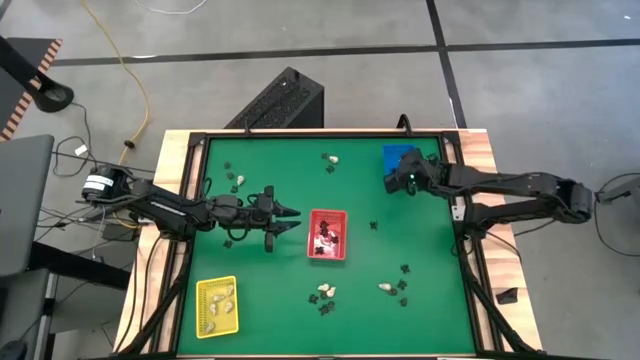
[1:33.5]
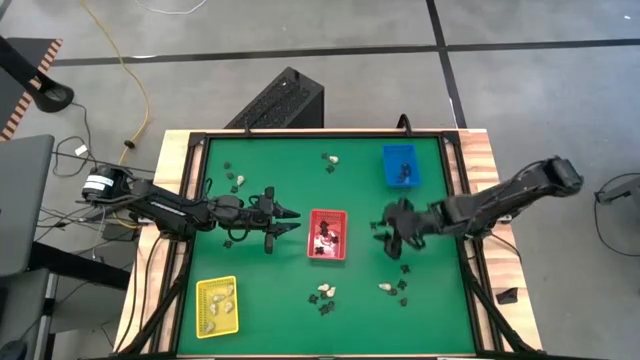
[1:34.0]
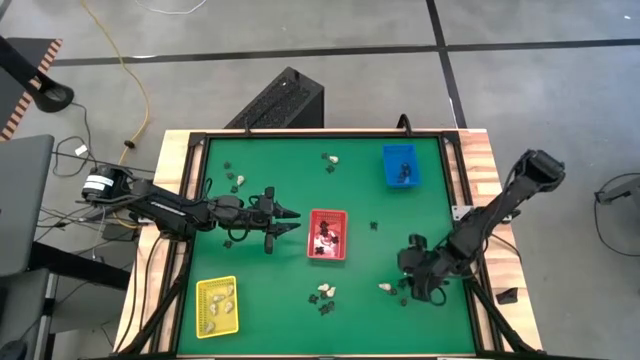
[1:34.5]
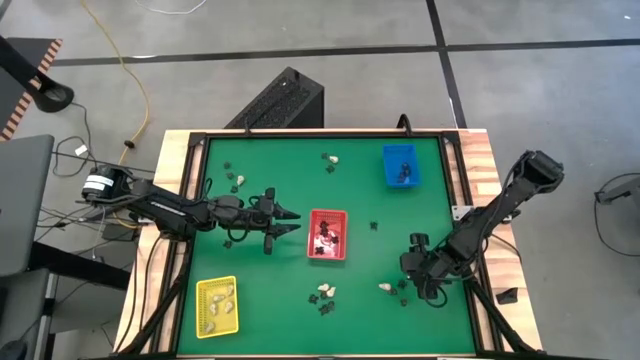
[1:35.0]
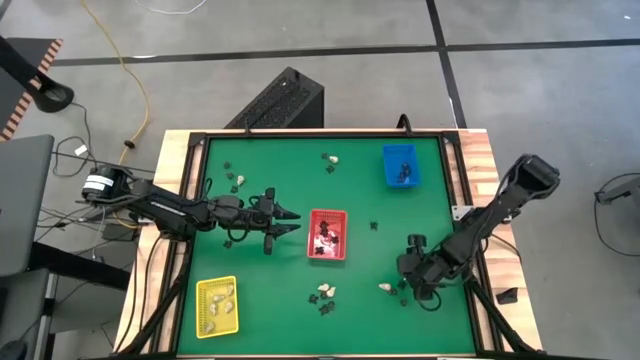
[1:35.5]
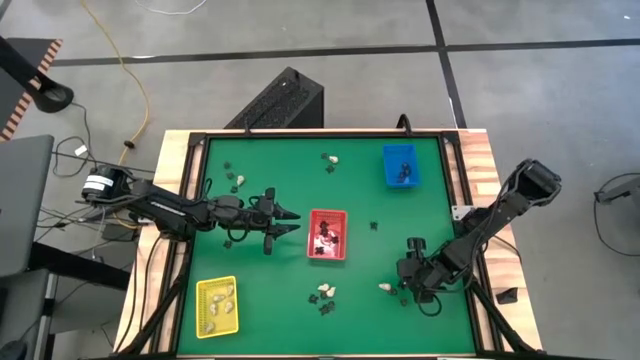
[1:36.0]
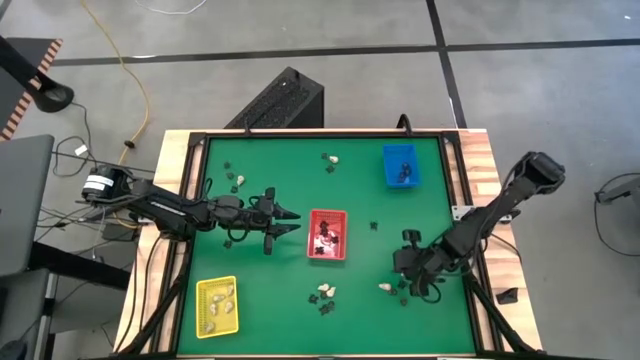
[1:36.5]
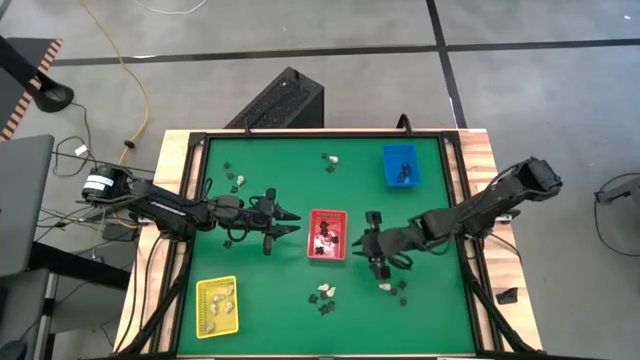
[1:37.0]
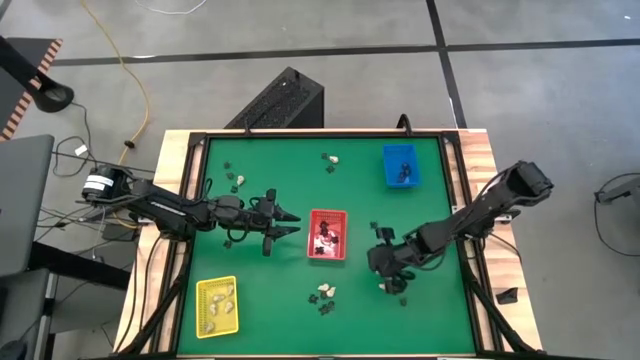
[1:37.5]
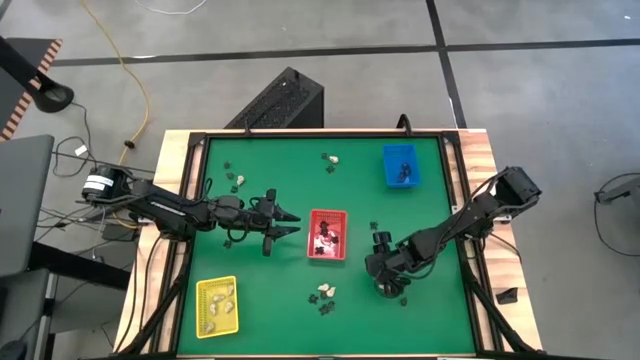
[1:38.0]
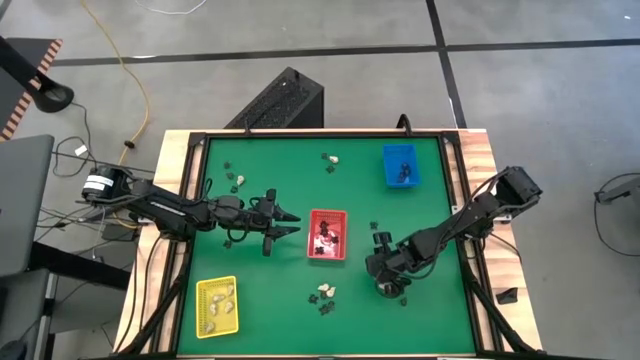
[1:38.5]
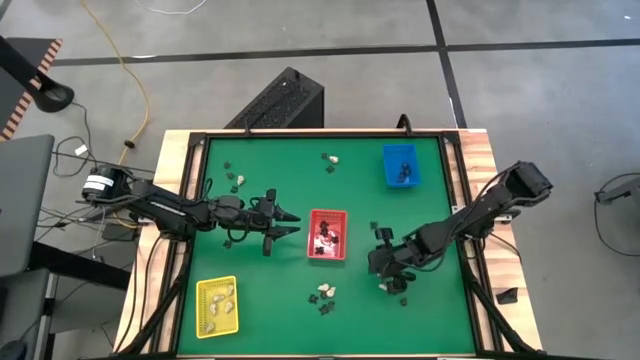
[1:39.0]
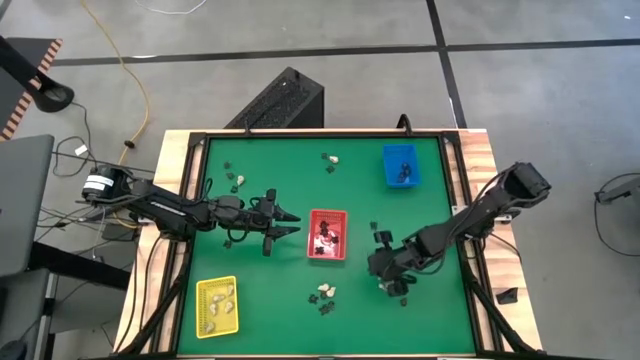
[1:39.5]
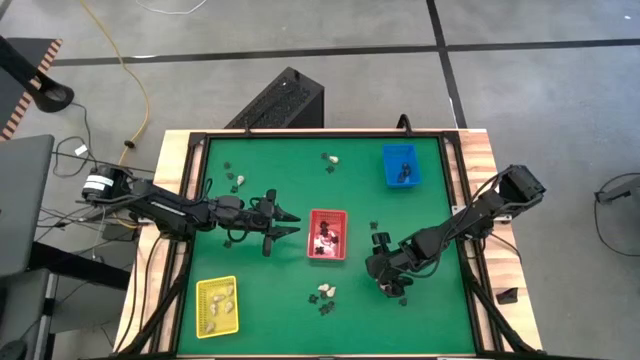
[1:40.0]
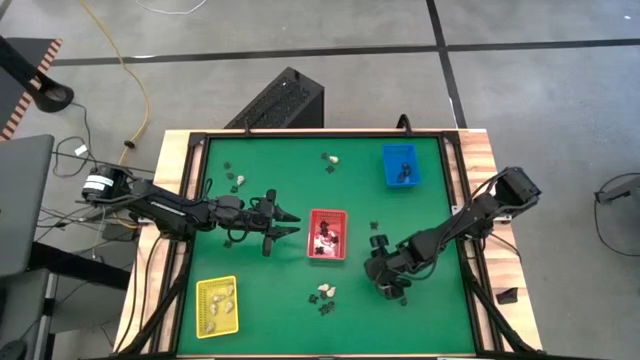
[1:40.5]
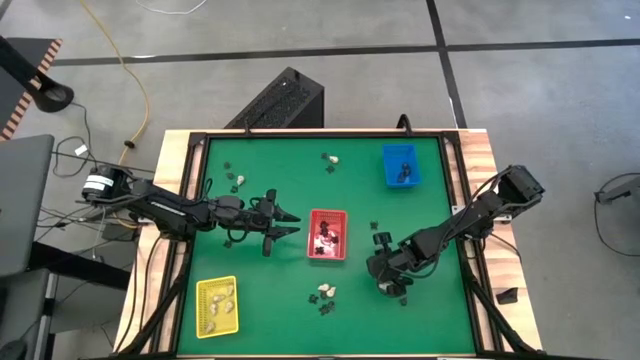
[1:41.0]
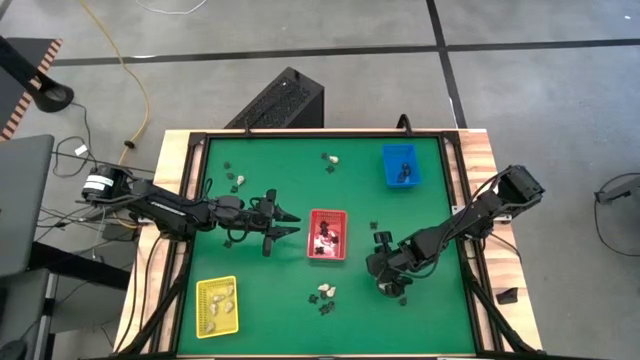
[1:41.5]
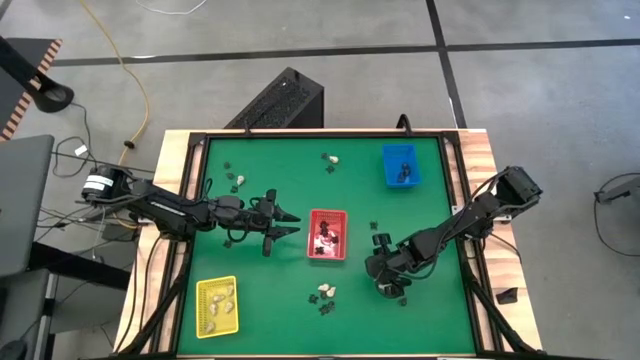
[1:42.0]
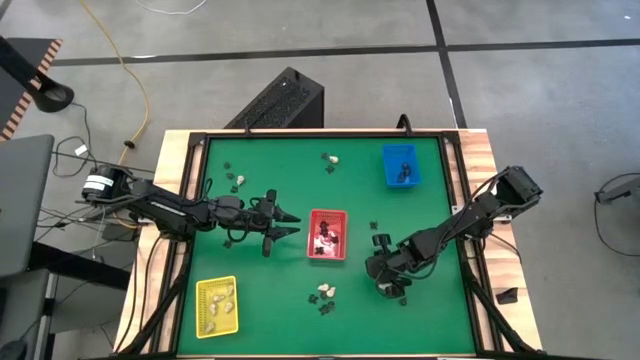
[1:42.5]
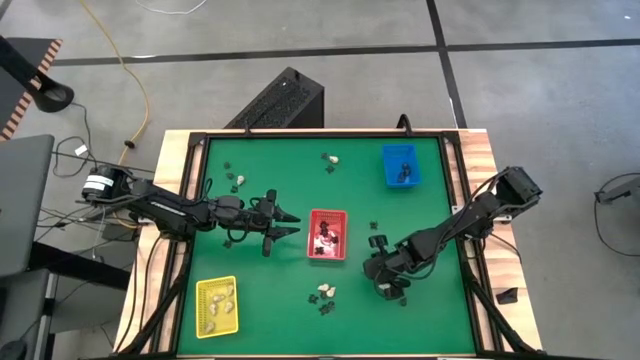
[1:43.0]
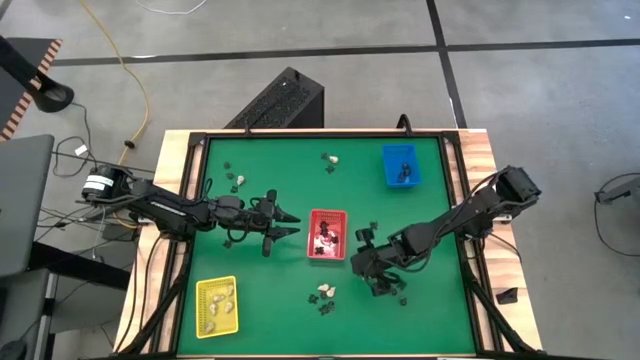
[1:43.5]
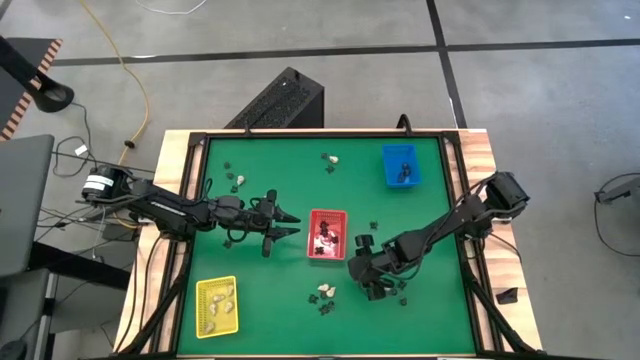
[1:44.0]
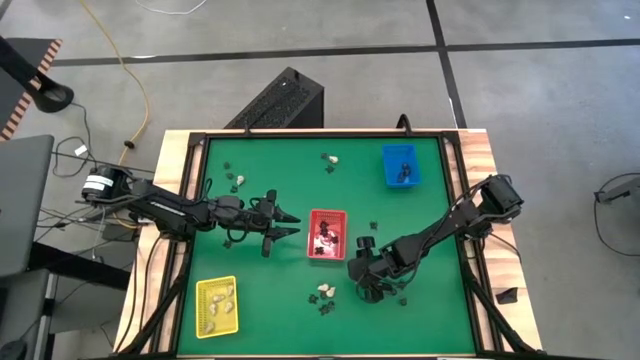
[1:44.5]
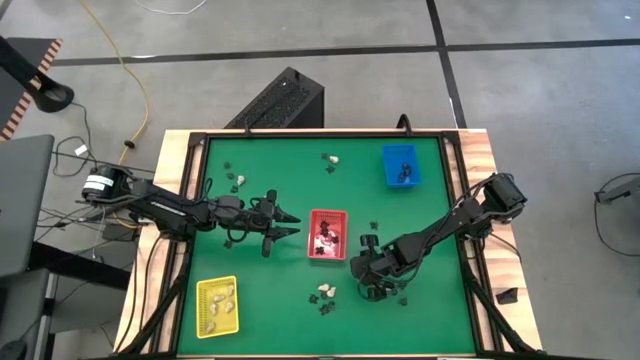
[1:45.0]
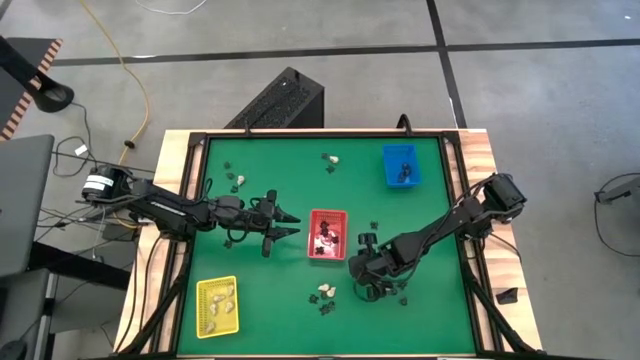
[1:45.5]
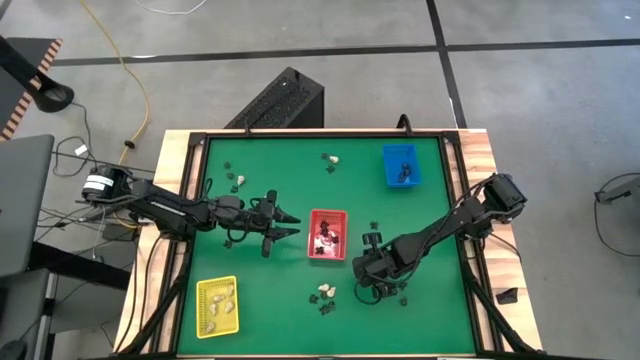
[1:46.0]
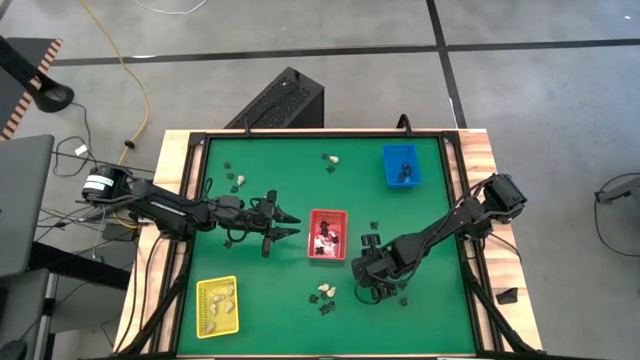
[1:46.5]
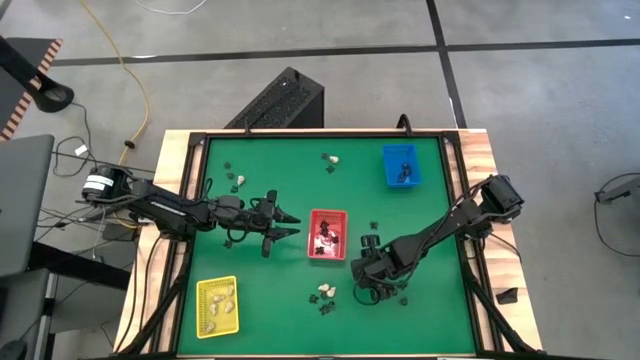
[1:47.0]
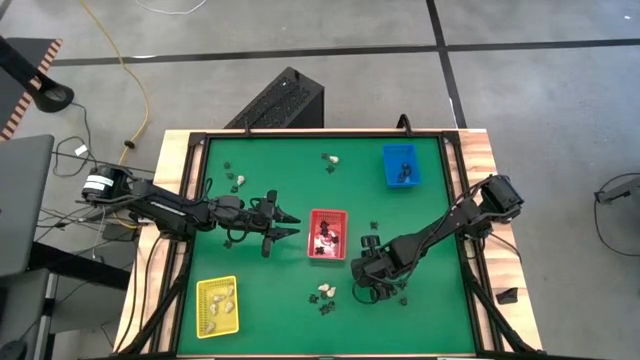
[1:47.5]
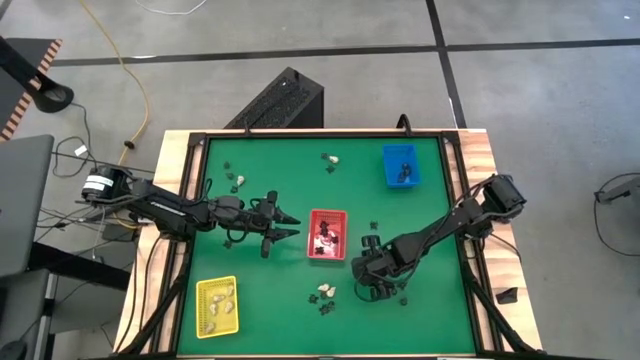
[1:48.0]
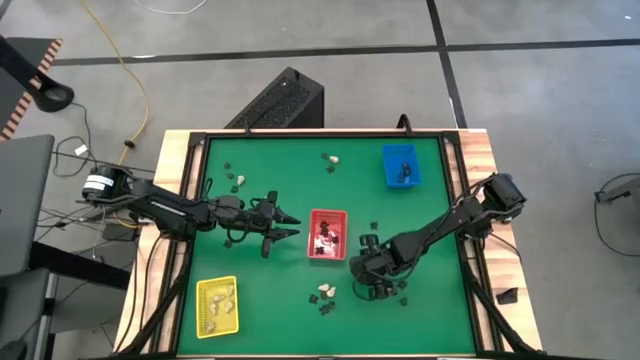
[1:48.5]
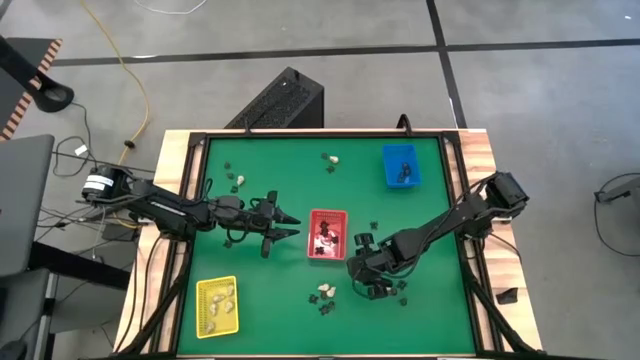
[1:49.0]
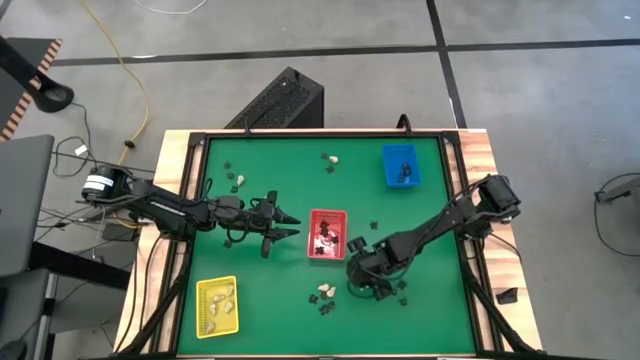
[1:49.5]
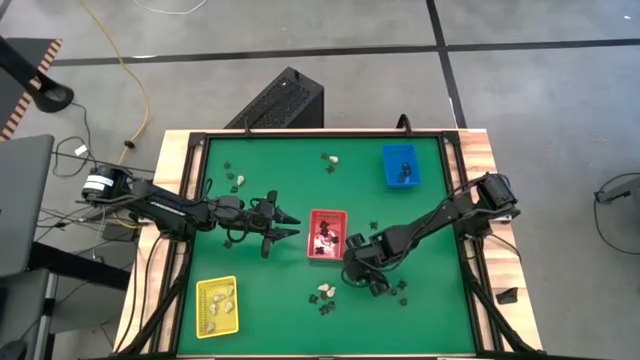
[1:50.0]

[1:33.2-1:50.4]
Task: Sort Halloween decoration
Put the black spider toy into the red bin

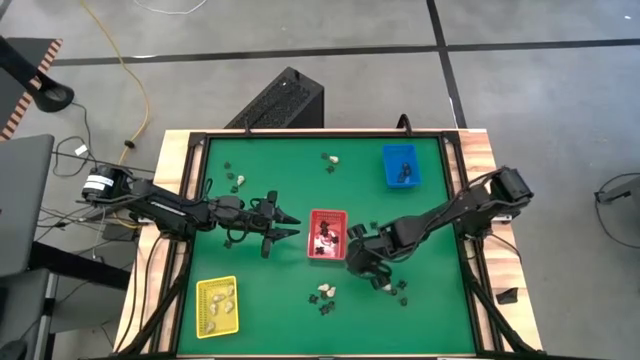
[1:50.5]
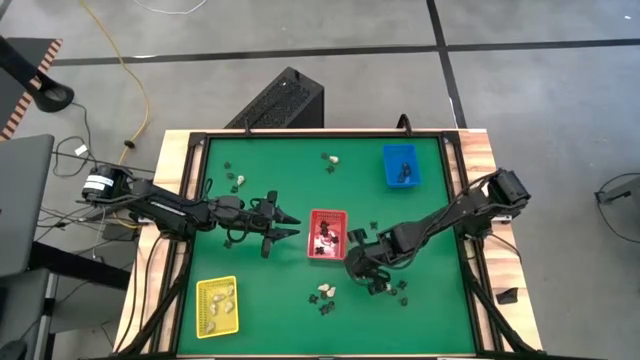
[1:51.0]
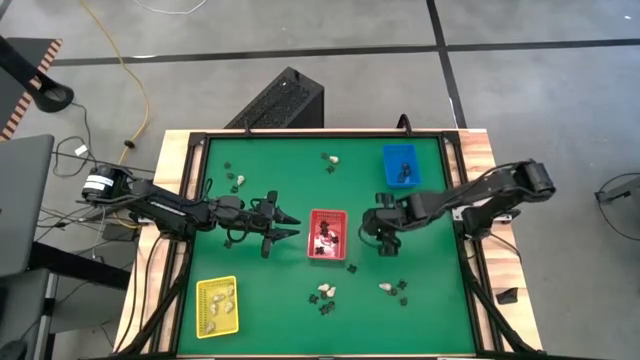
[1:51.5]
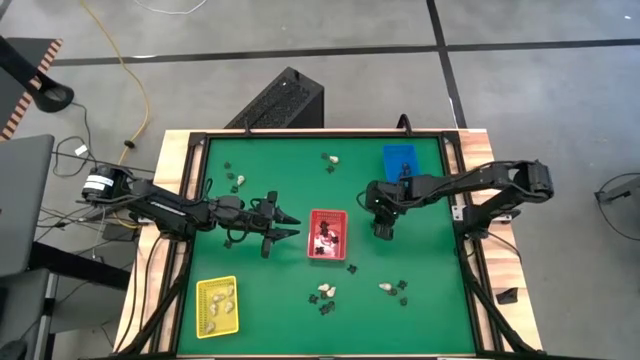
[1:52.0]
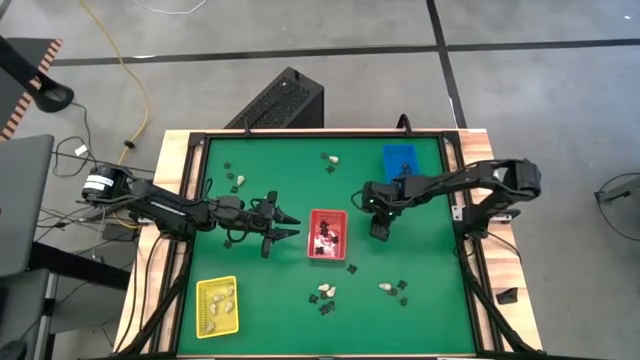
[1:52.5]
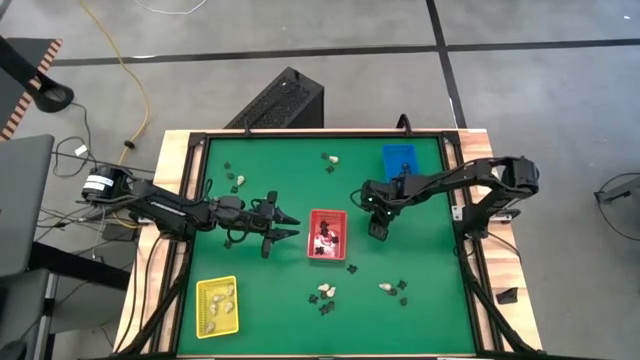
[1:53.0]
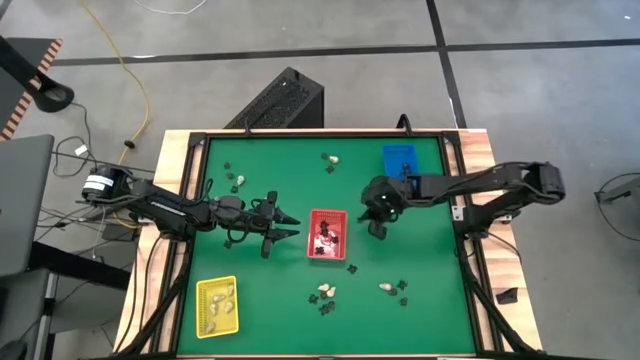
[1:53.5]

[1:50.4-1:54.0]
Put the black spider toy into the red bin

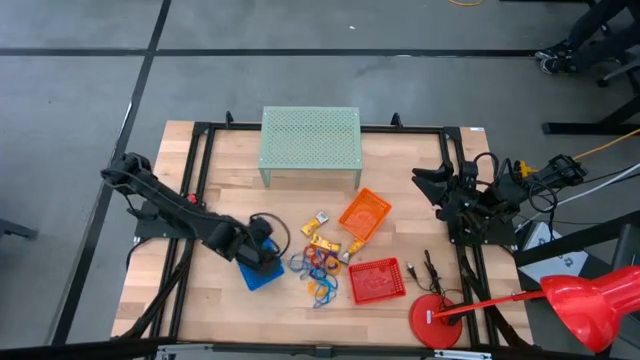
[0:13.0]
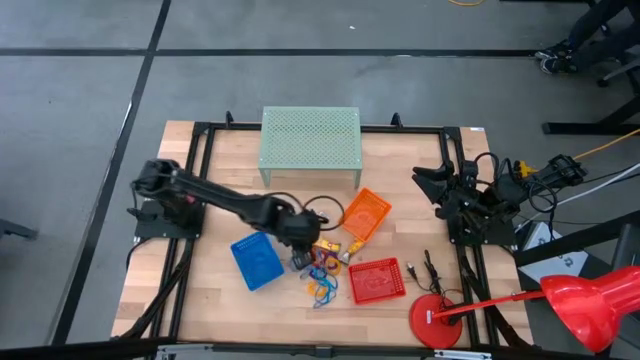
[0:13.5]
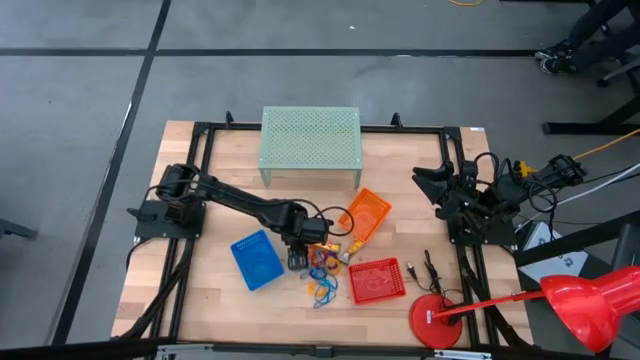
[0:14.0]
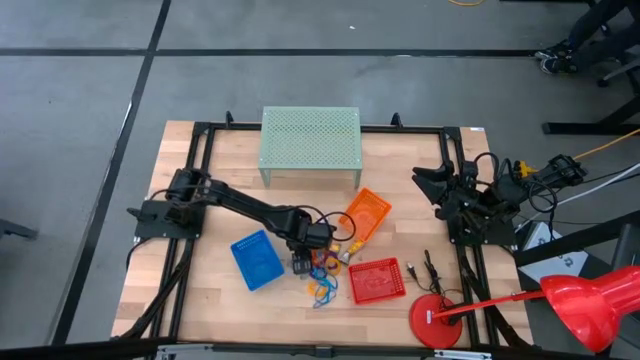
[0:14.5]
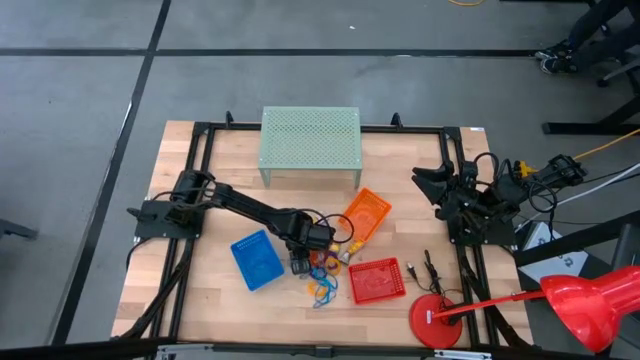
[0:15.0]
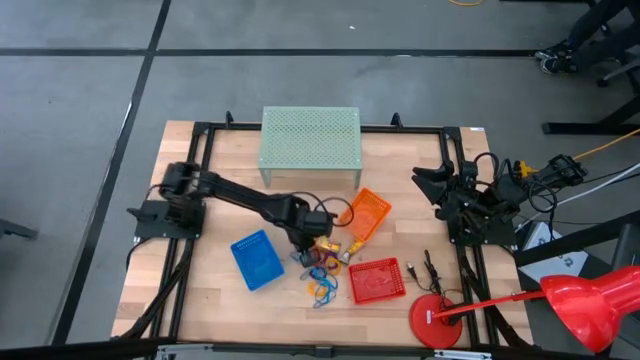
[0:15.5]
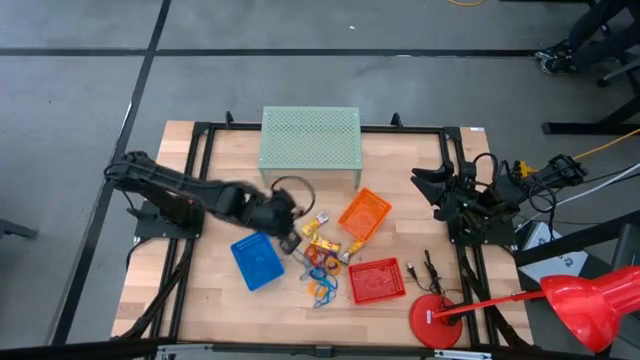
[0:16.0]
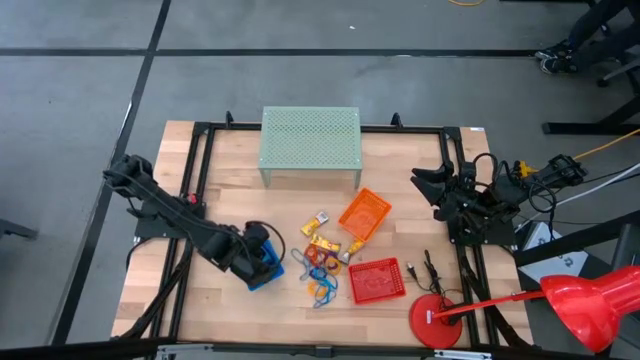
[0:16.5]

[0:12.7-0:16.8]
Task: Pick & Place Office Desk Supplies
Put the blue rubberband into the blue bin
